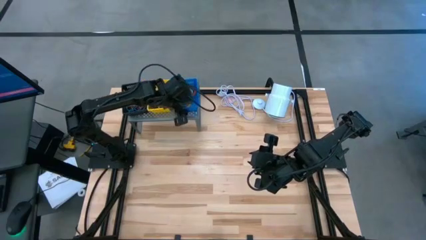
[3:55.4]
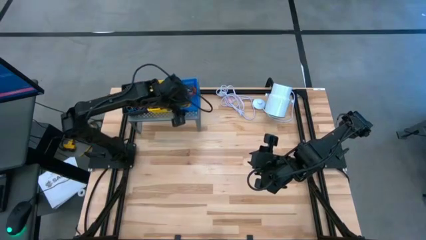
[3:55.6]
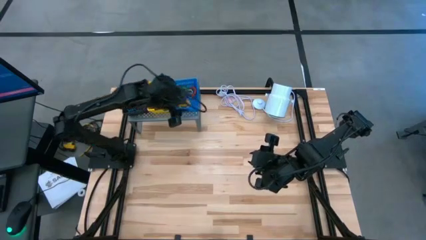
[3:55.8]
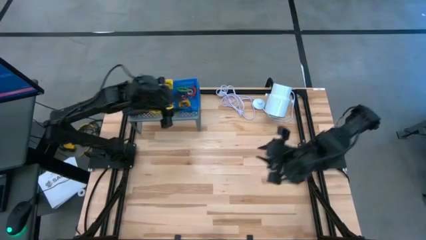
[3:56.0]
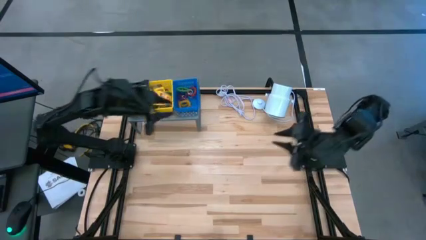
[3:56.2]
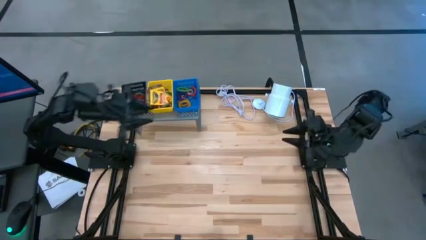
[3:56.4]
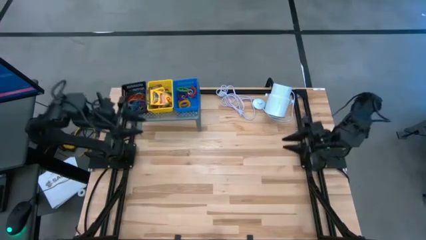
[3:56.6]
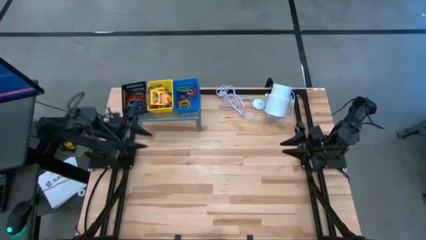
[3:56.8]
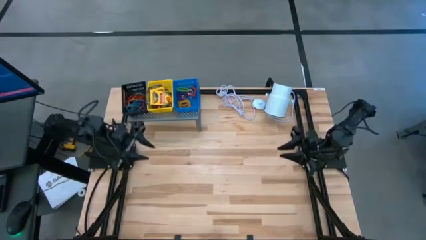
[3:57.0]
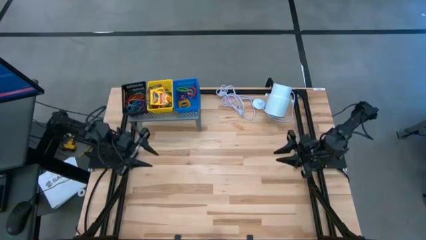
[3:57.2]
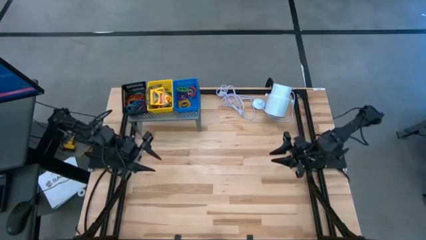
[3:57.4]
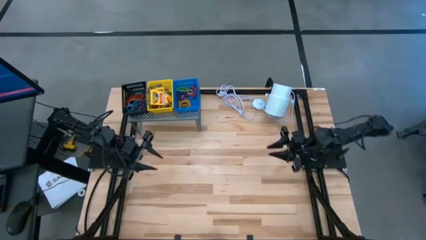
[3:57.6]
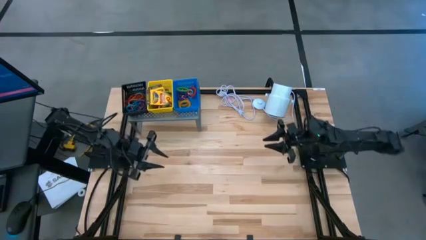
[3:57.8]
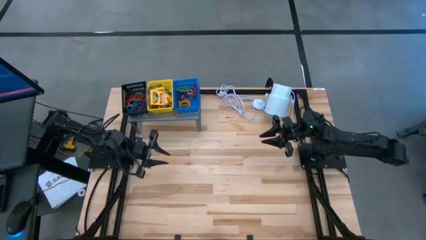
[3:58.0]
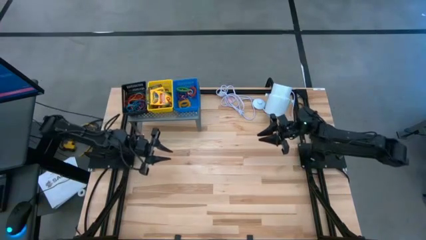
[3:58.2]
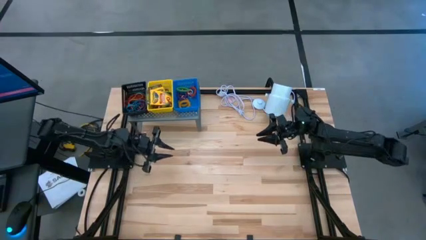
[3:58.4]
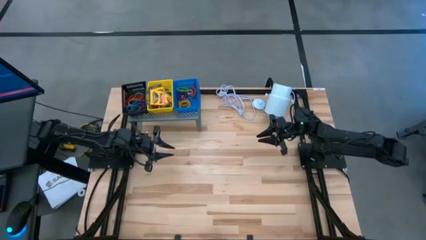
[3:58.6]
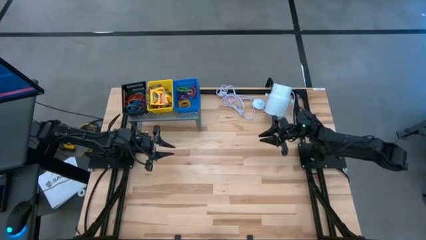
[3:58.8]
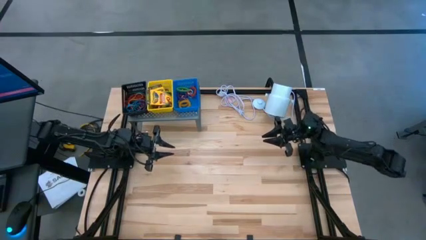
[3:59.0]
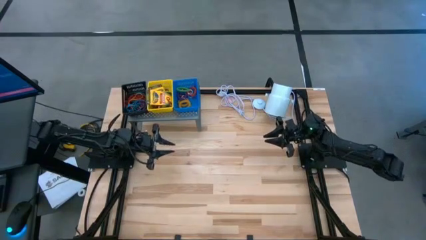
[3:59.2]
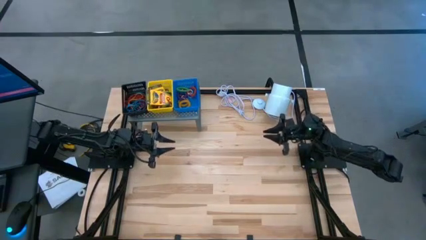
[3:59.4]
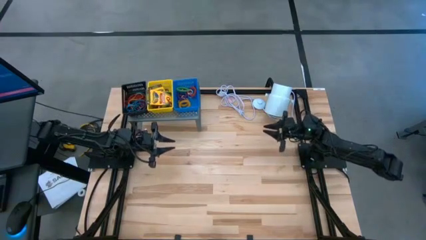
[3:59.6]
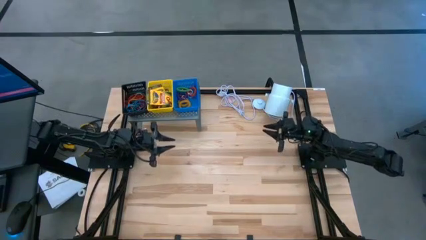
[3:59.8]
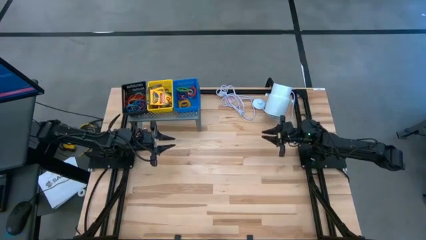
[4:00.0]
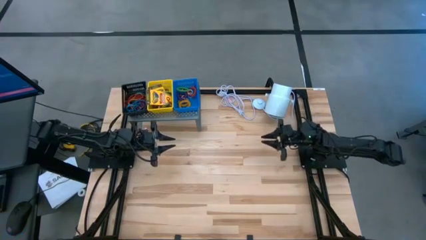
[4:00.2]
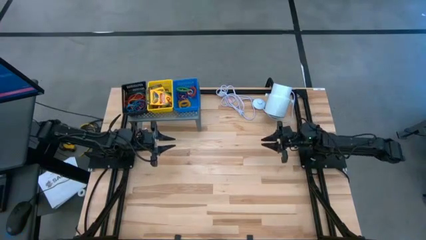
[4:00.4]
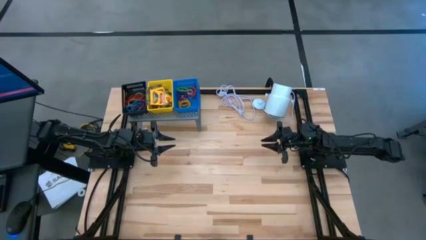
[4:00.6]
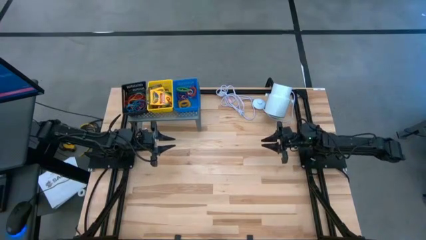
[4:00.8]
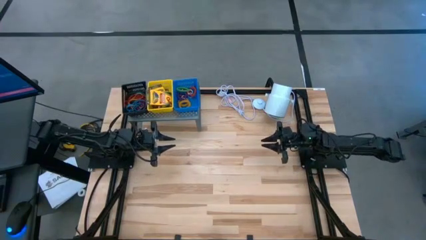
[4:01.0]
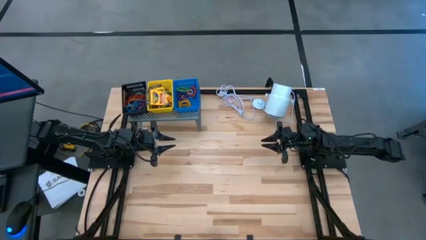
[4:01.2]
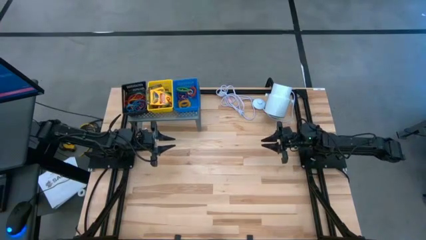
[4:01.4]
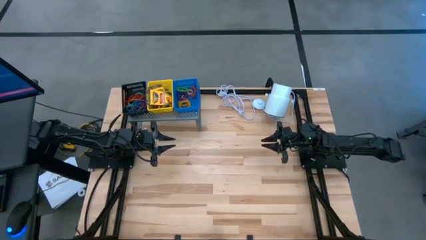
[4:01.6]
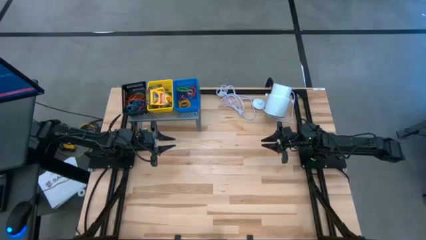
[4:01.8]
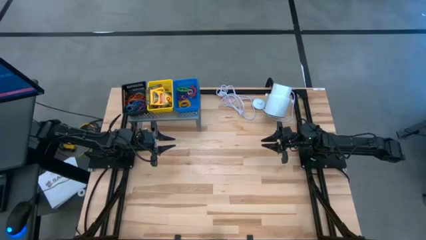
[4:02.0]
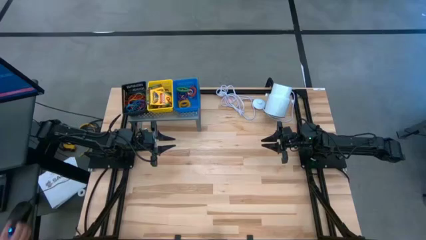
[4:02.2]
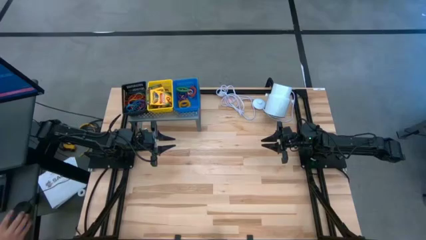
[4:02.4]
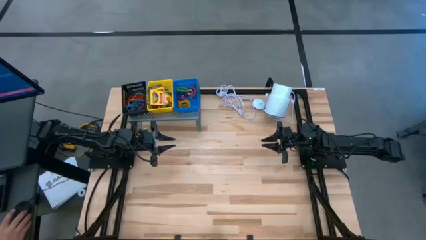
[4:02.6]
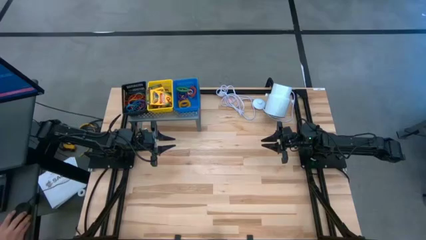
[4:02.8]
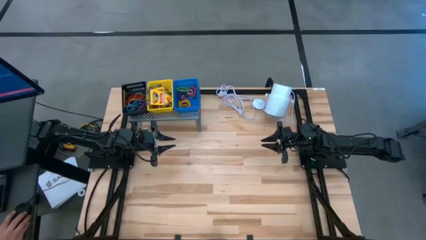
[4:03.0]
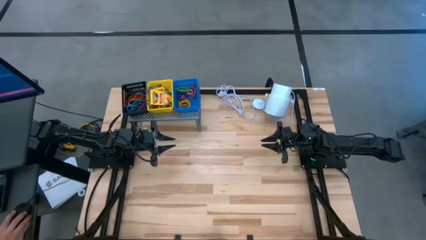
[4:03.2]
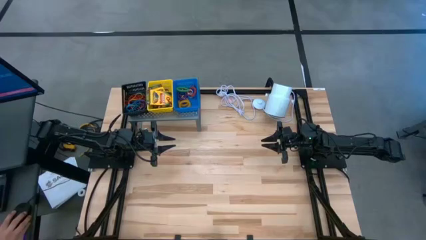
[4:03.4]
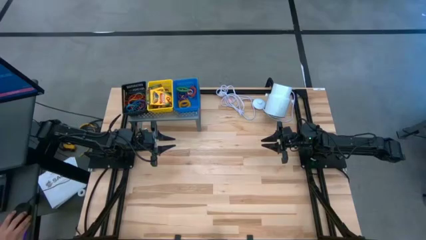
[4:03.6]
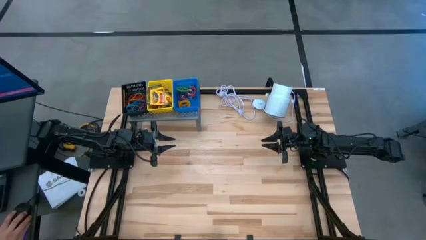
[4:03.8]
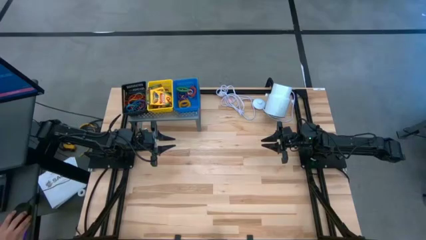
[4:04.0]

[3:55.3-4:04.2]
Task: Pick & Place Office Desk Supplies
Return to Home Position

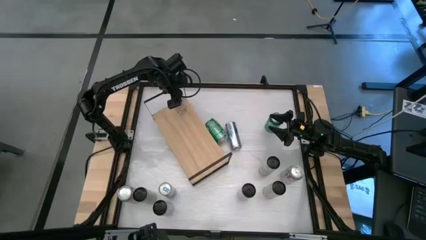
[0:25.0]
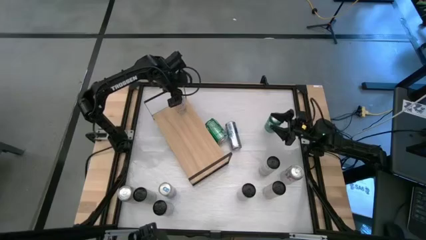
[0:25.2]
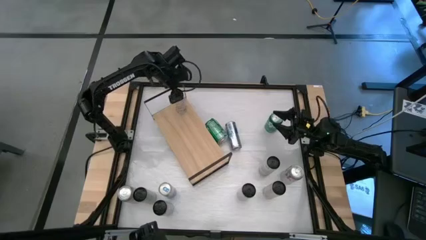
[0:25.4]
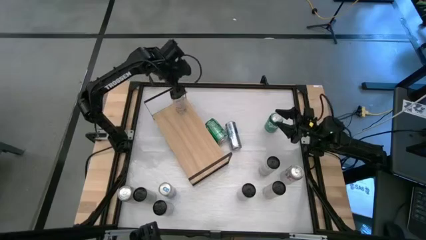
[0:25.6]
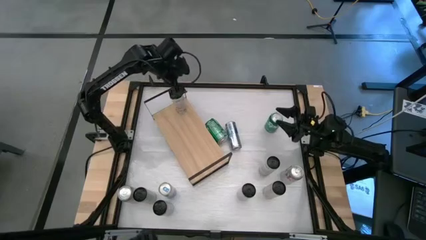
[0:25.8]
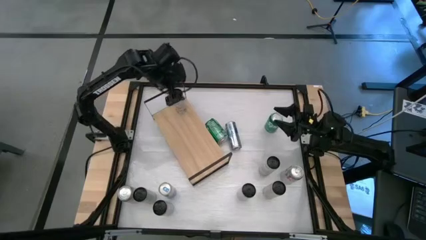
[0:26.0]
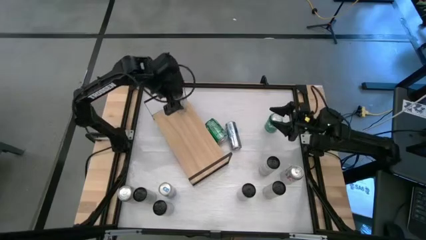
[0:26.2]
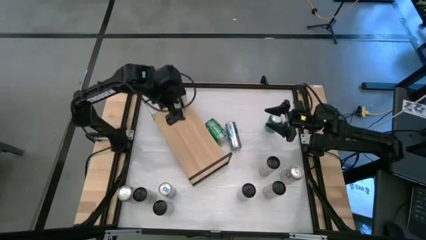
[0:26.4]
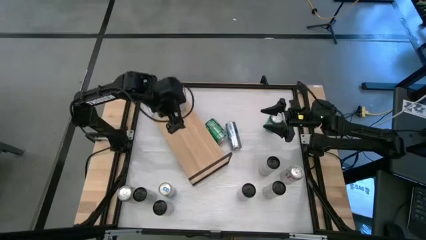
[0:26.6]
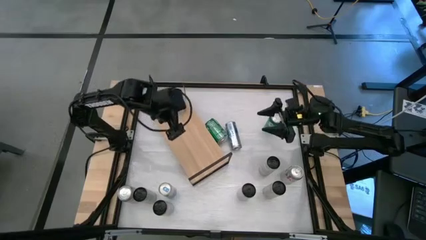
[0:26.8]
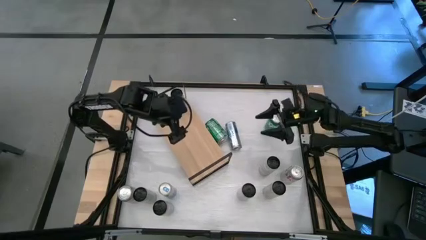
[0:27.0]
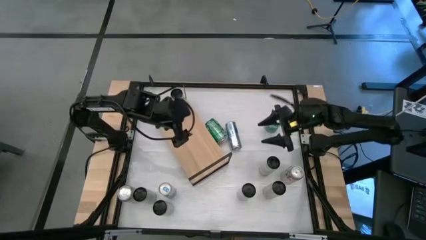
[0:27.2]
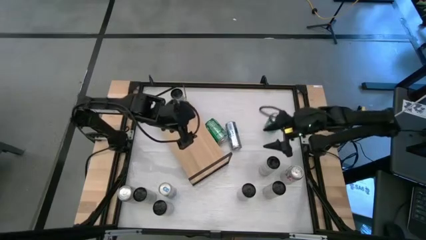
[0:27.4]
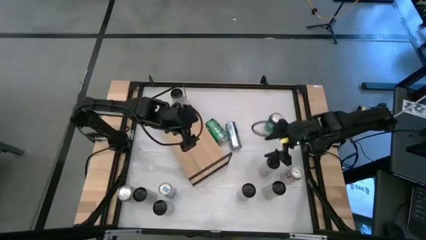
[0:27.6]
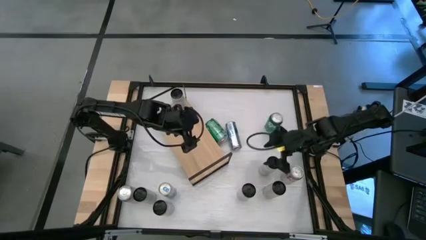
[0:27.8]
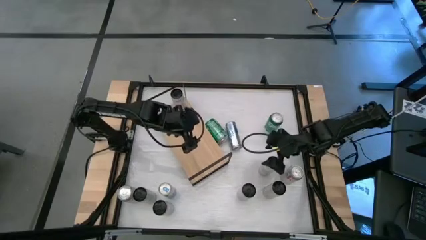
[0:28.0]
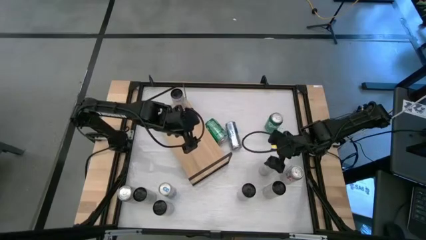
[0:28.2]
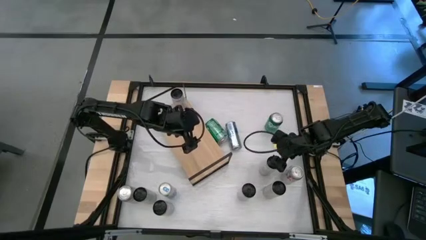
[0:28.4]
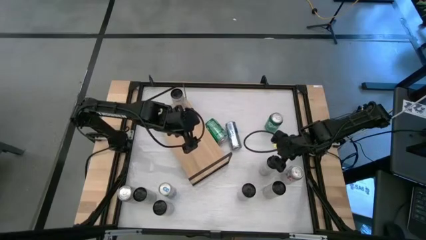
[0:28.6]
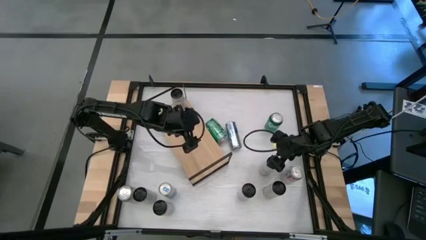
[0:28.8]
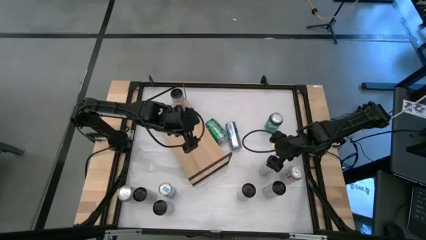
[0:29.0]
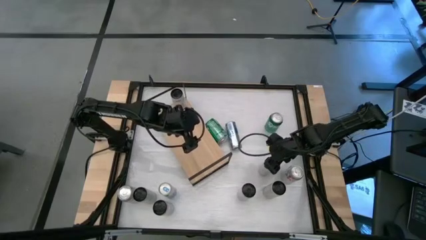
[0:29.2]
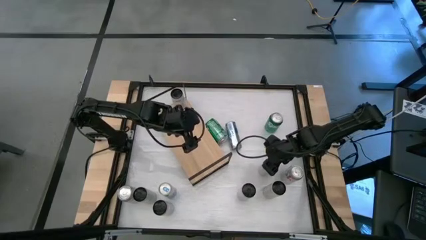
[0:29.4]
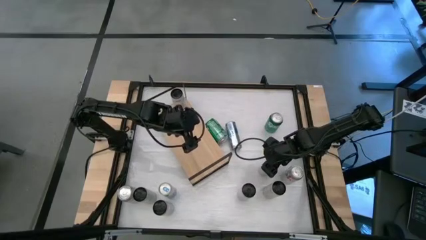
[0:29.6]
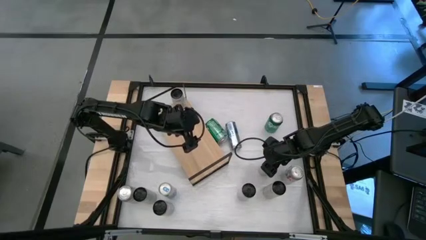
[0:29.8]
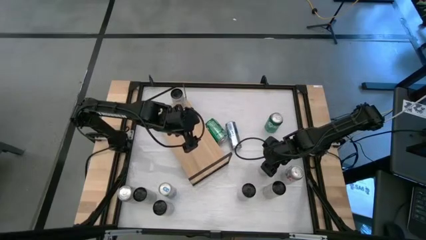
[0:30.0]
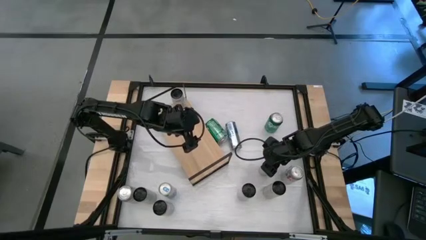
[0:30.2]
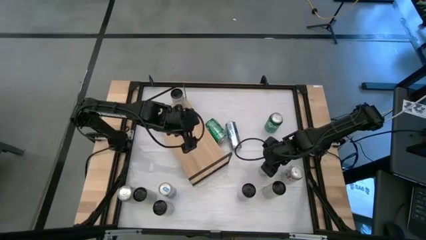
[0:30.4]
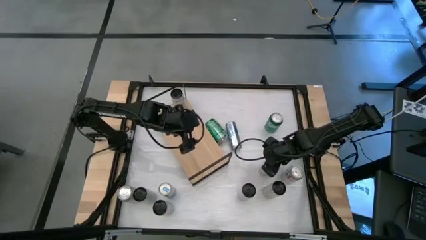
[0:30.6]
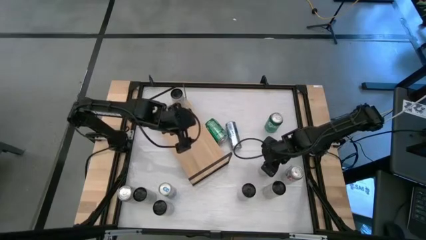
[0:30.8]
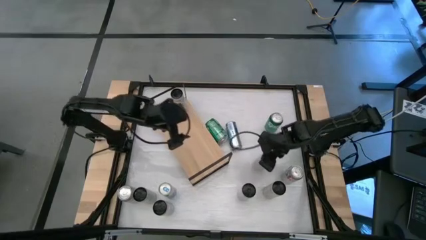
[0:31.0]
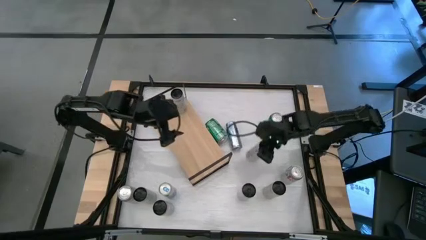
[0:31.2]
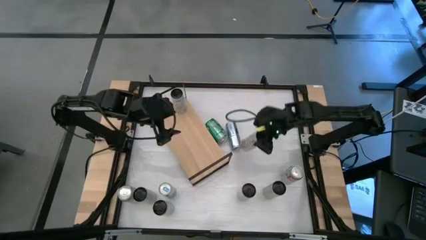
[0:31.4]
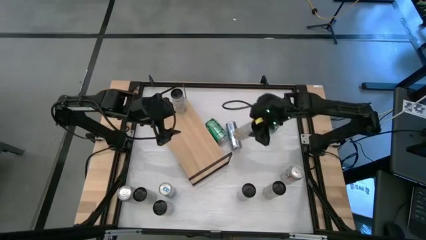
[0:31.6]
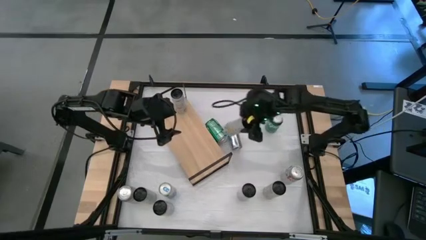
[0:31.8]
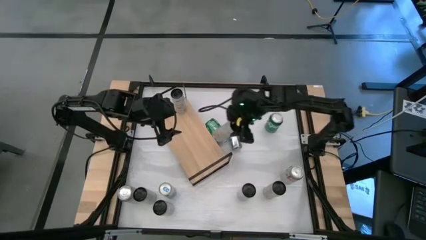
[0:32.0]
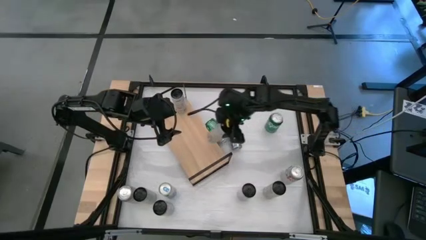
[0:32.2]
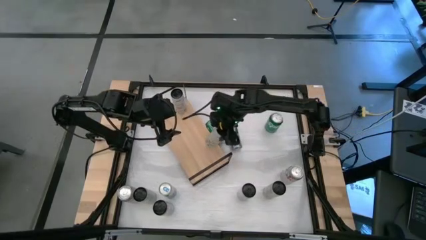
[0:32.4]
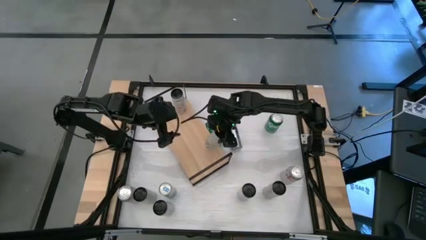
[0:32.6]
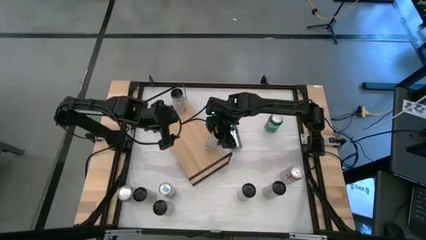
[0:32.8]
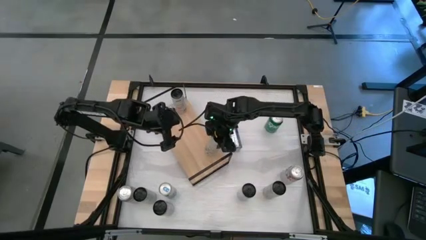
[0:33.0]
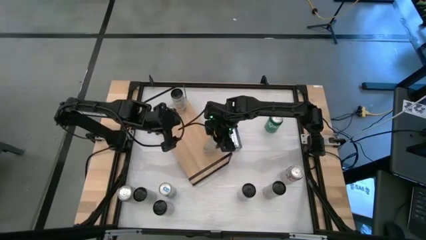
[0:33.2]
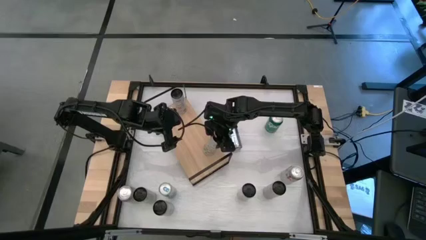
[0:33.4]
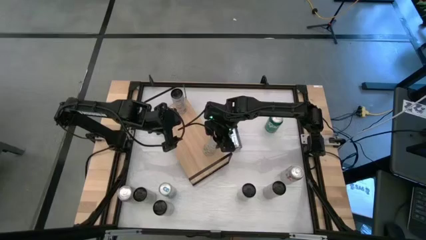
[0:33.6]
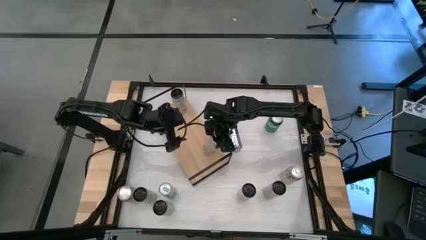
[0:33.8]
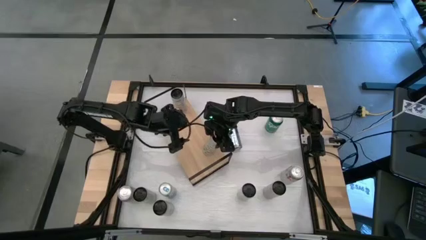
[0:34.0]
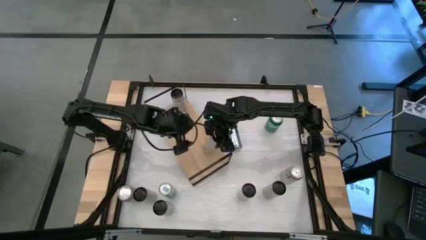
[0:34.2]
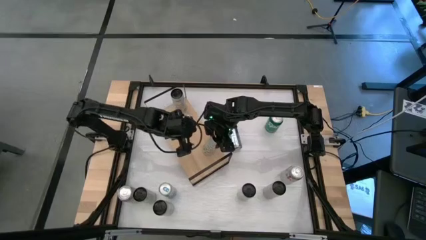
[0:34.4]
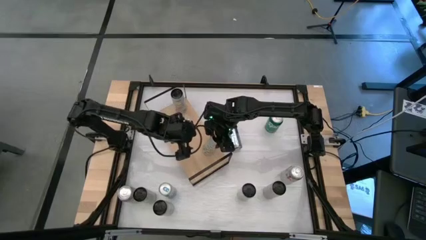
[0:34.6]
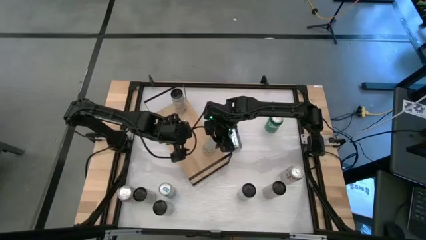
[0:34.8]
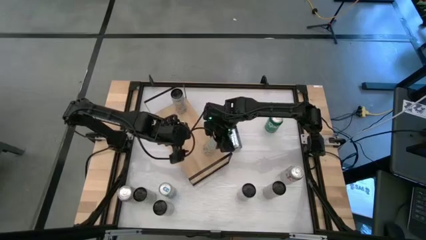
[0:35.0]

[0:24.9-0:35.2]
Task: Place canned beverage on shelf
Put the white yellow soda can on the shelf
